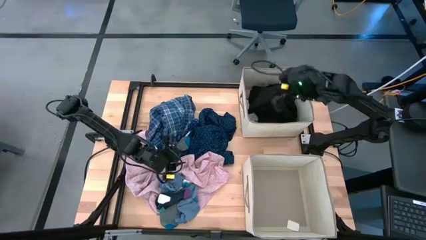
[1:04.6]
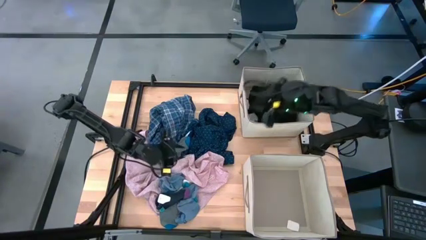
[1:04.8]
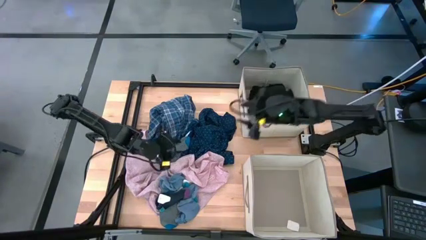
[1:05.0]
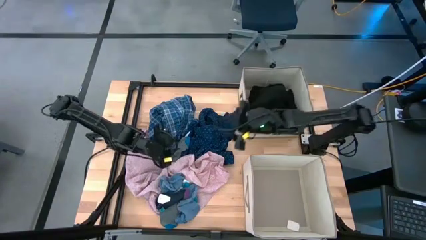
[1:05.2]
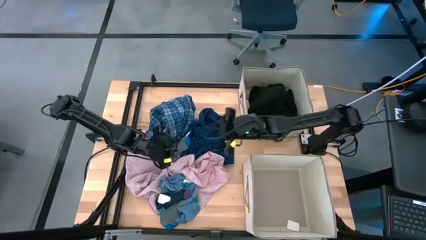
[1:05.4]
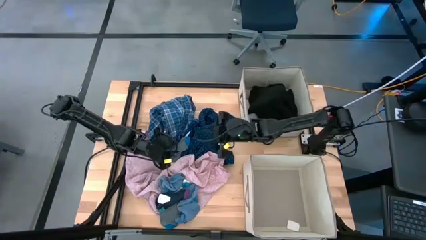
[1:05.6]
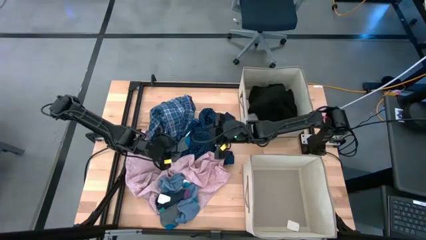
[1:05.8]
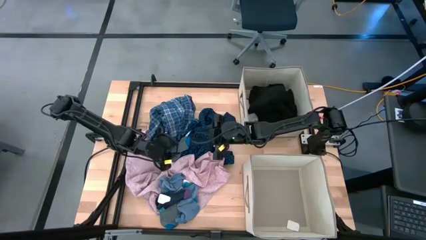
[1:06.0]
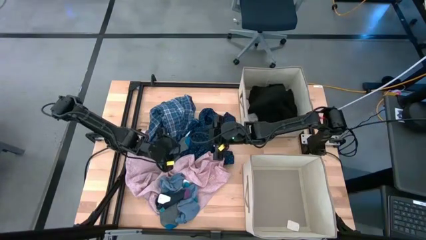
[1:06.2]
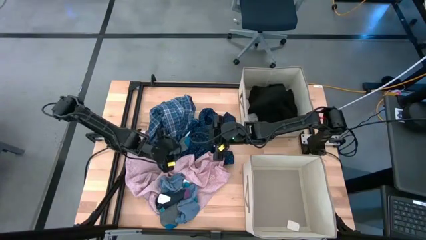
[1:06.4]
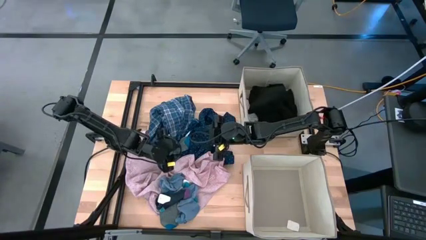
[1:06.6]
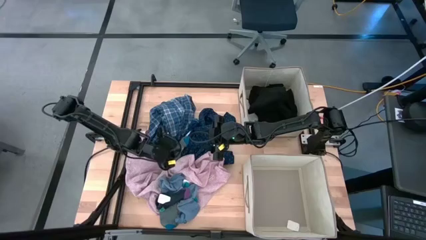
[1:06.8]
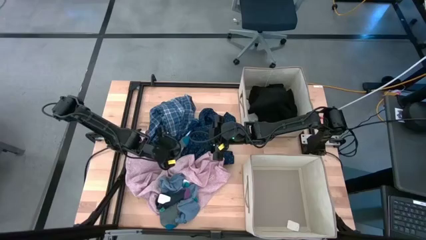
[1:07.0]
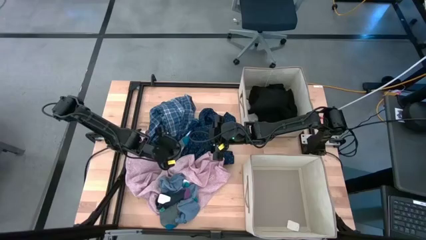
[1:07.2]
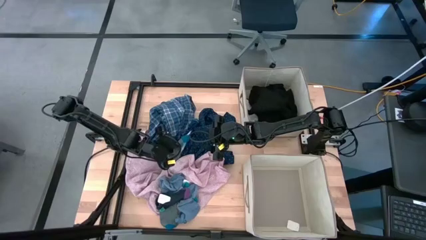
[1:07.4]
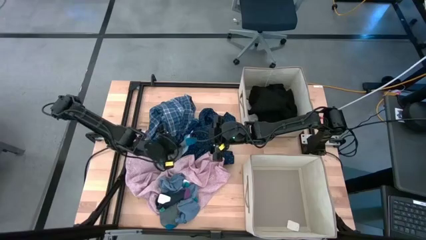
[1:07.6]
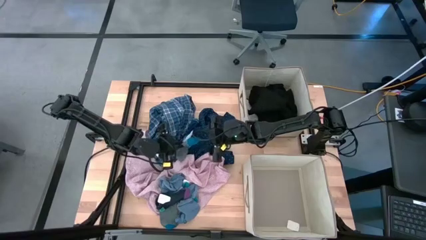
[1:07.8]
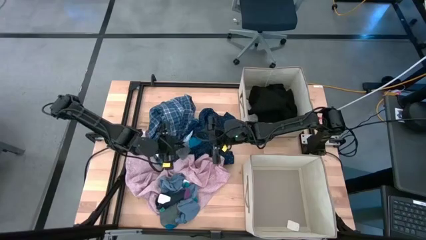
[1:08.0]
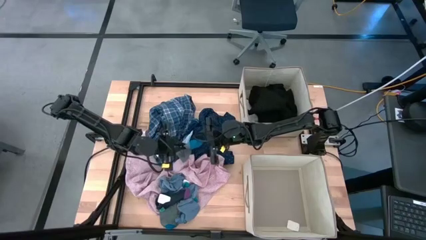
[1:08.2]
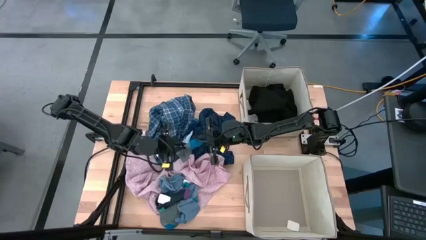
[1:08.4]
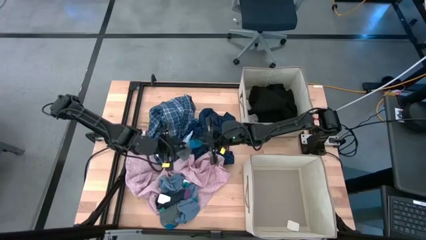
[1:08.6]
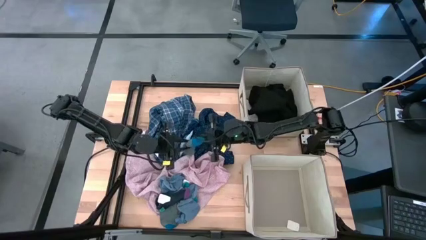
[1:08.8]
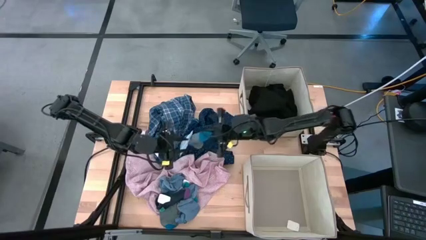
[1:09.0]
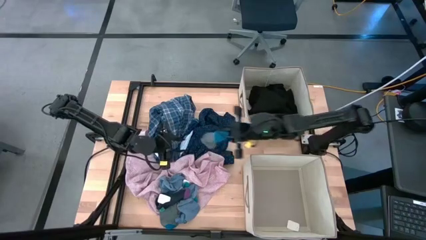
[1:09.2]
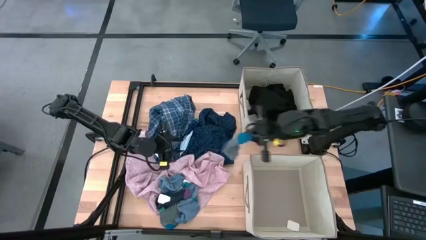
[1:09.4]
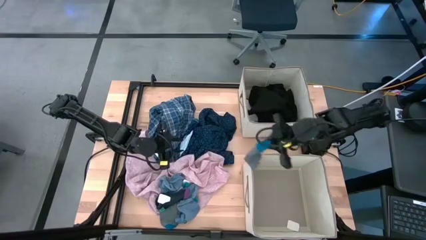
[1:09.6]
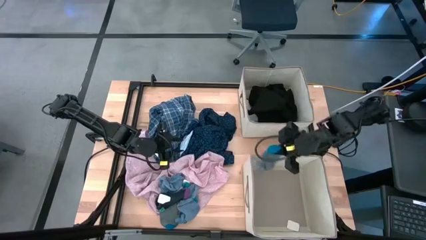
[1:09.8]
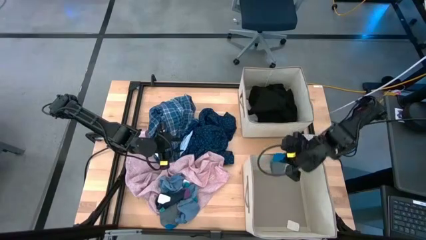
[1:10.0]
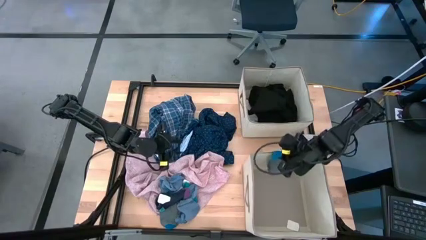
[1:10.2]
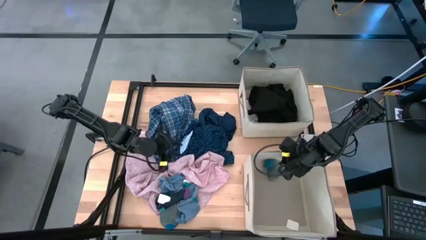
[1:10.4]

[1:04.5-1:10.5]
Task: Sort clothes
Put the top gray sock into the bottom laundry organizer

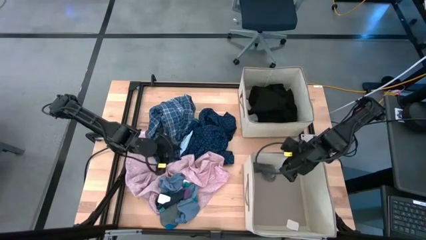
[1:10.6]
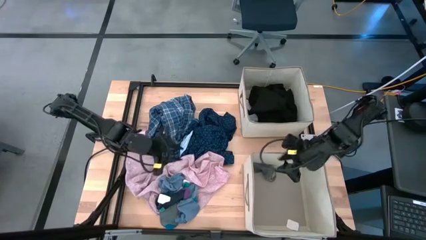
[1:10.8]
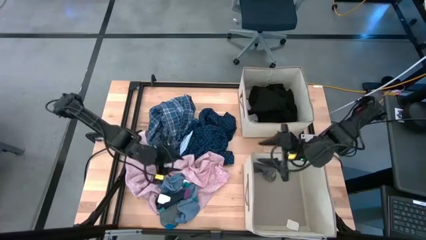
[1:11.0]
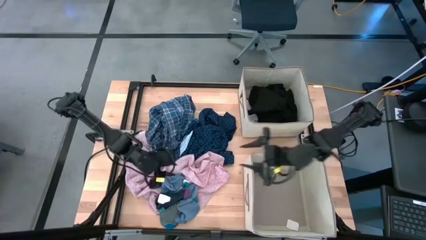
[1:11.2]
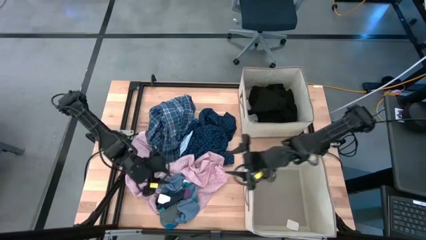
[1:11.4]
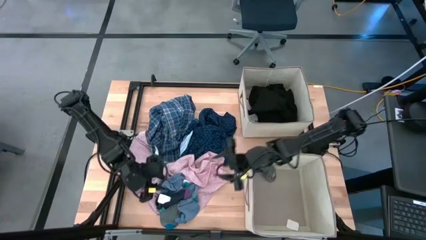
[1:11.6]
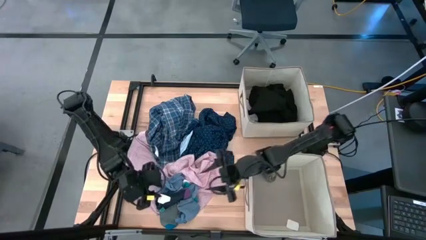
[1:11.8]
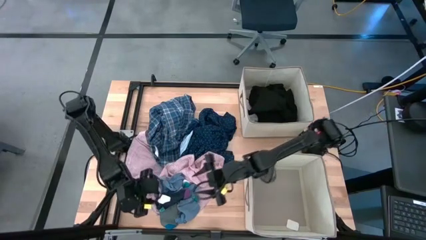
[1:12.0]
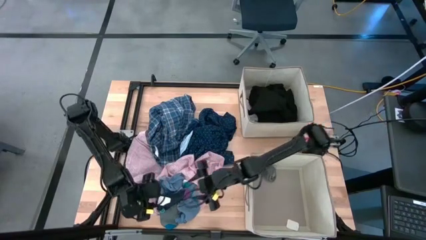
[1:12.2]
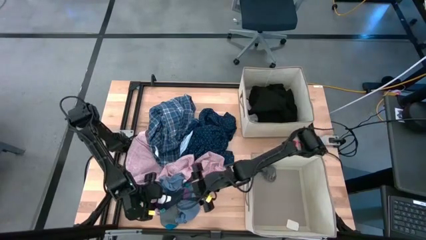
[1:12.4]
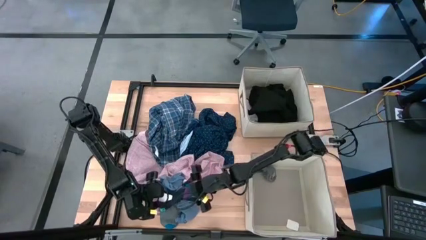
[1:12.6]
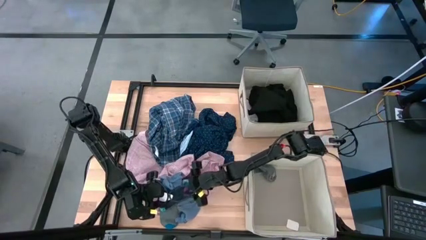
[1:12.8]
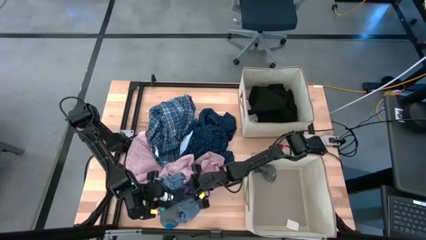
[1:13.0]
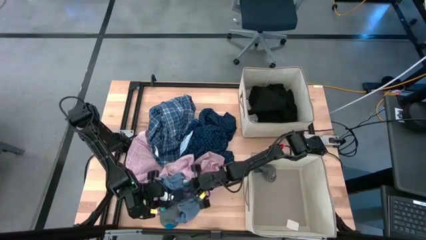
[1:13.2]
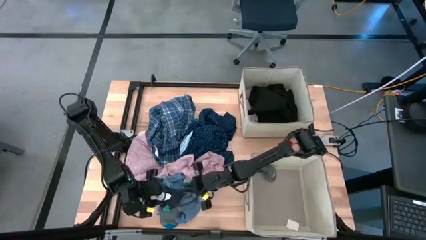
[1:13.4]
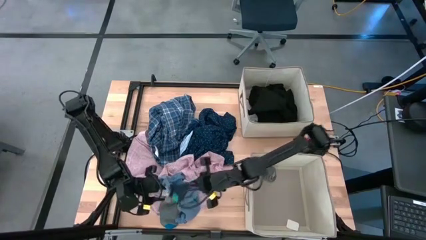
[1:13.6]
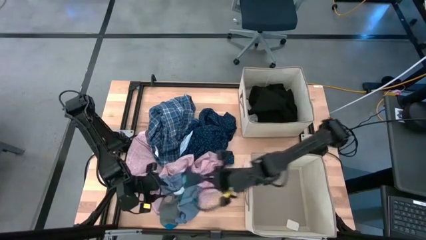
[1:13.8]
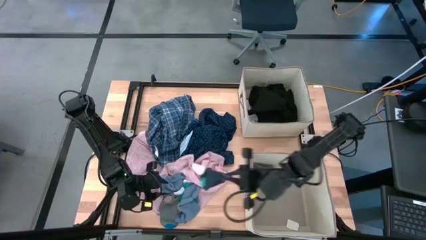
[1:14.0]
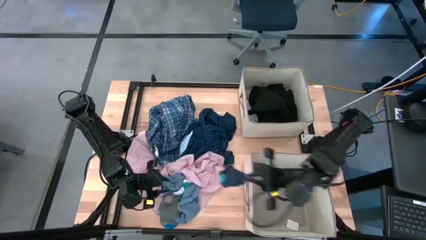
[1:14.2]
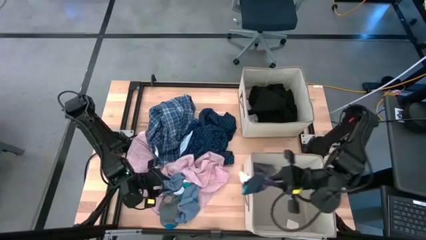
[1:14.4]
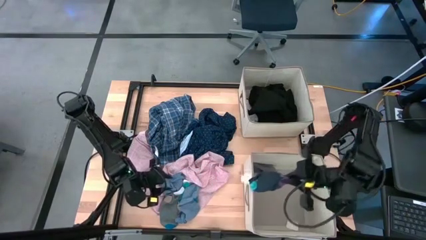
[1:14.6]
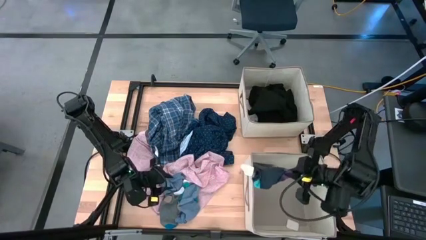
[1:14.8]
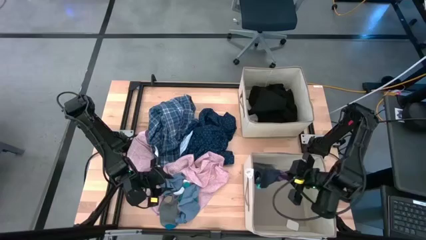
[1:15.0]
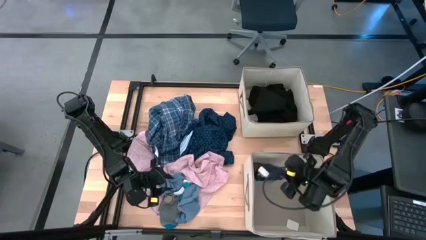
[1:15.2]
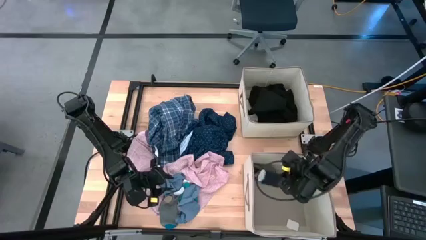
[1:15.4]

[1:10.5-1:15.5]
Put the top dark blue sock into the bottom laundry organizer

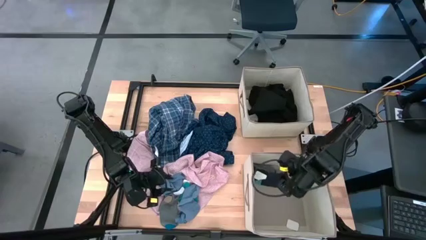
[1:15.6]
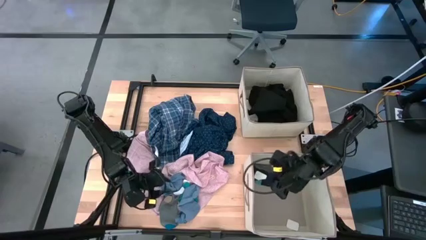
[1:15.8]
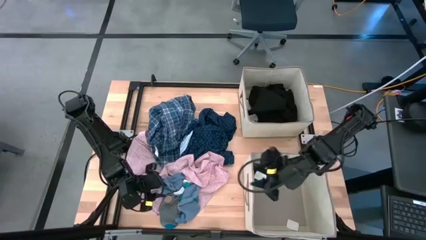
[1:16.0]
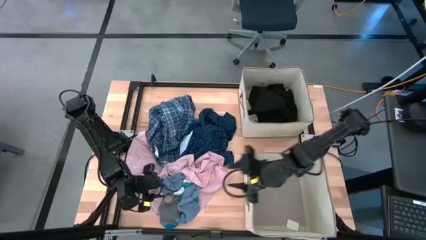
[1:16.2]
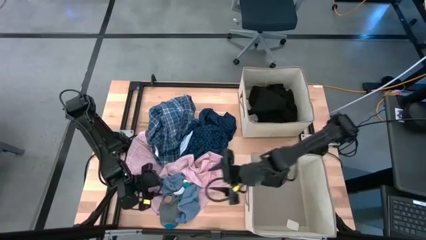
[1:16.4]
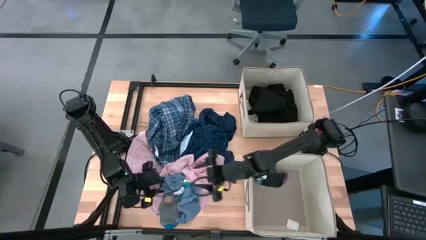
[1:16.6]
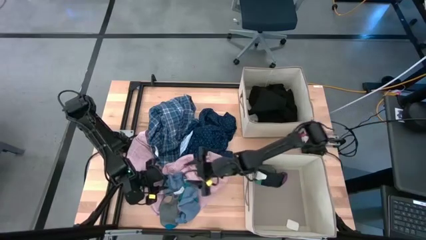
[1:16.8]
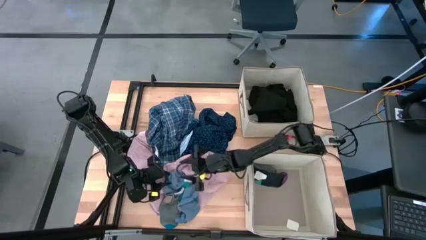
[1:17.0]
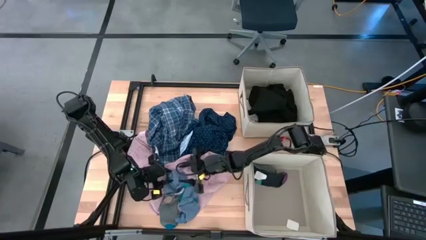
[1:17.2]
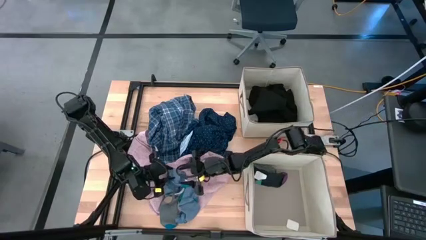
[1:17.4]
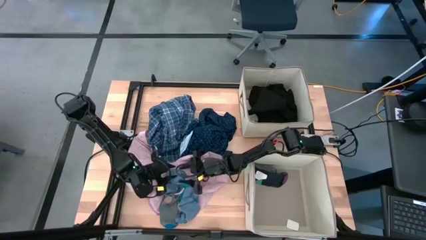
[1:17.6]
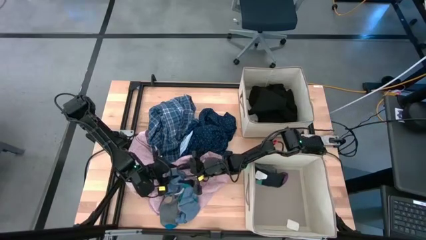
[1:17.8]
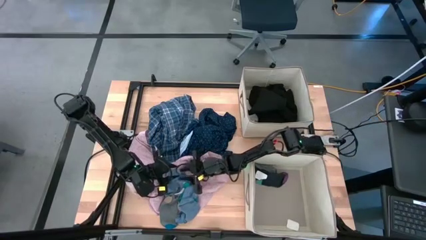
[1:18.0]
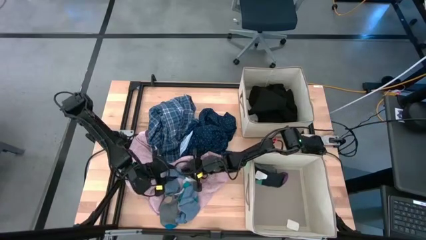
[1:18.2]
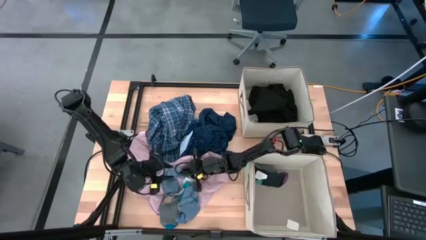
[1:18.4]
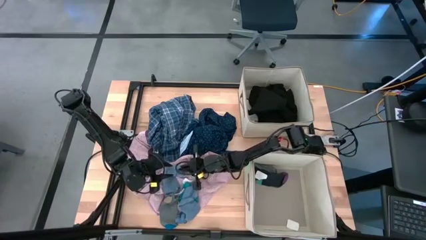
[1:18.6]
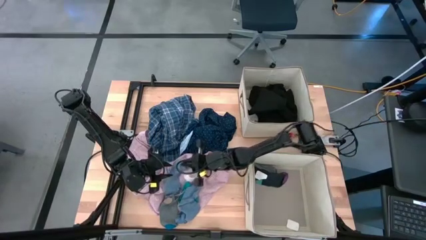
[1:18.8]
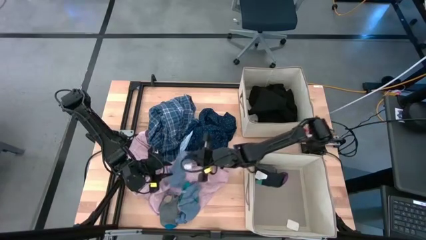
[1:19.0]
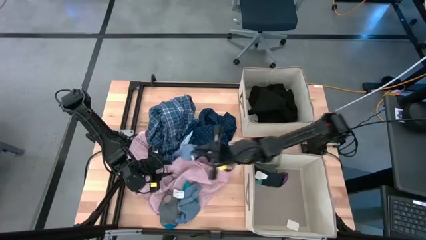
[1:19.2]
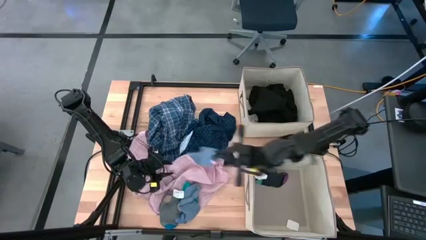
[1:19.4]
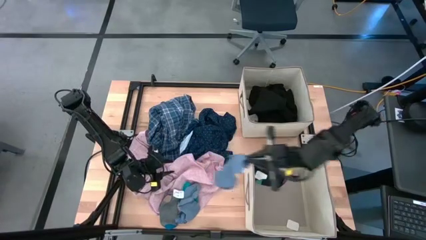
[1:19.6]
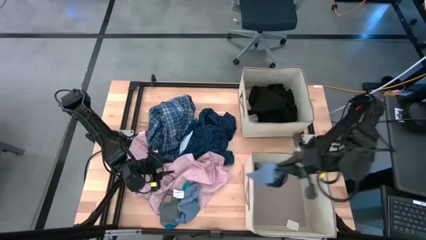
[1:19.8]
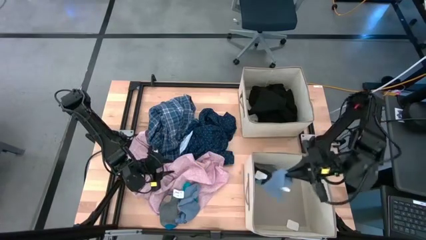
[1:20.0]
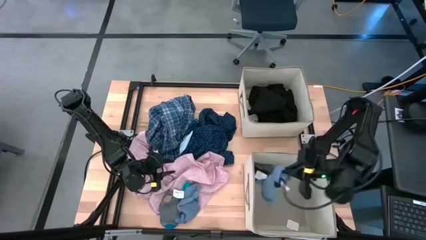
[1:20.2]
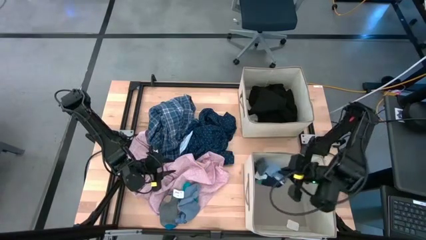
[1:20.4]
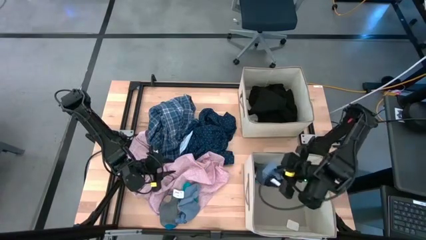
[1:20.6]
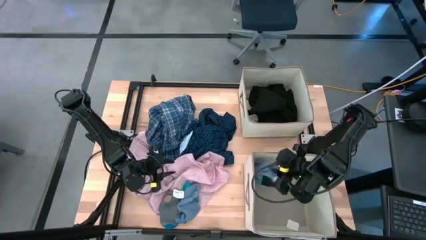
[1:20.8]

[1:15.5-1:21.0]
Put the top blue long sock into the bottom laundry organizer

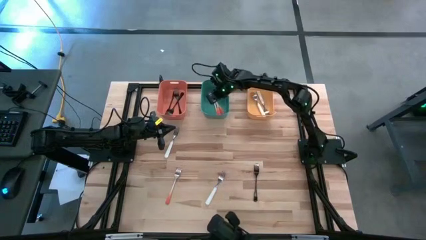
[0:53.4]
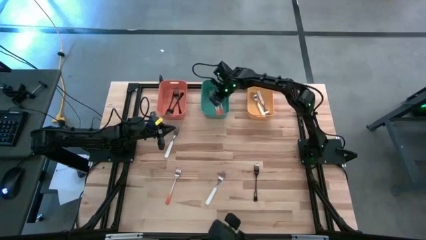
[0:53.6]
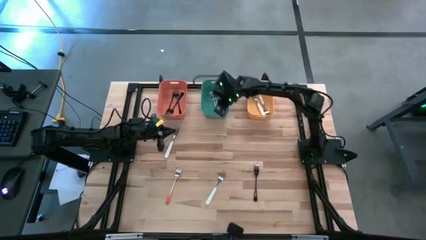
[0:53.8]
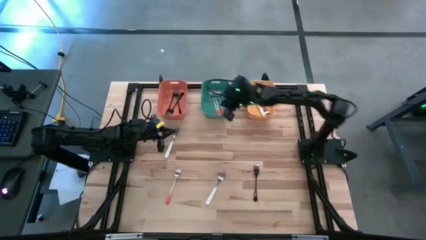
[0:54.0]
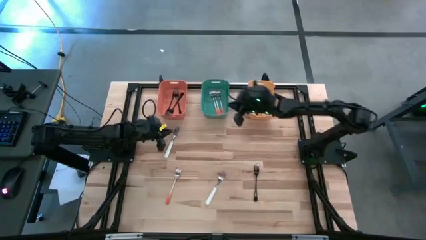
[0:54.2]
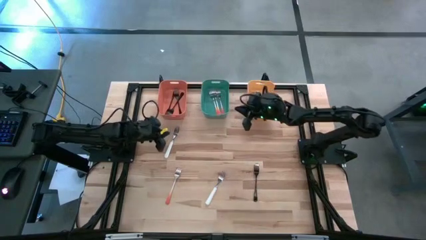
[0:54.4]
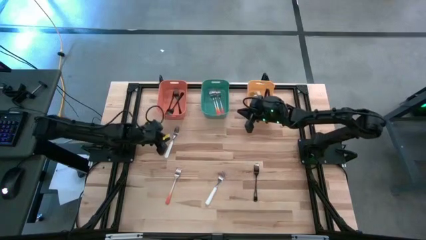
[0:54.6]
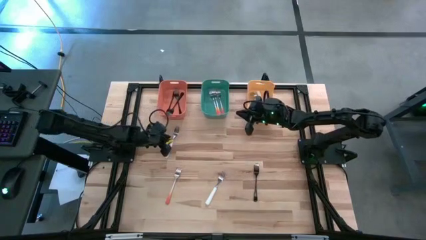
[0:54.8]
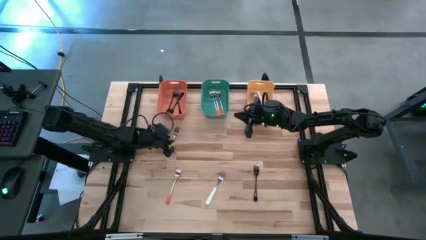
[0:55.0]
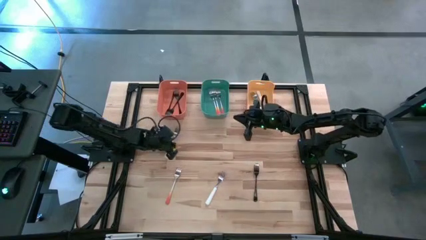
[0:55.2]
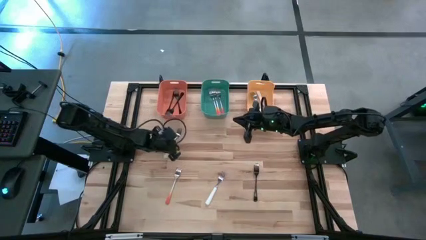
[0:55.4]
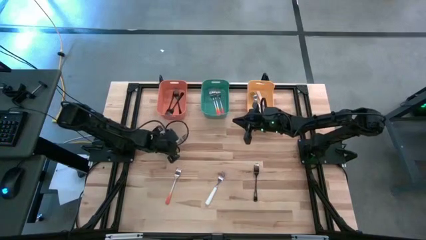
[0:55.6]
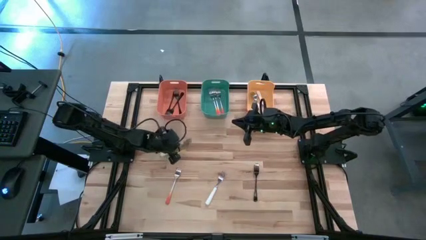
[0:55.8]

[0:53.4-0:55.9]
Task: Sort silverware by color (type)
Put the top white fork into the yellow bin
